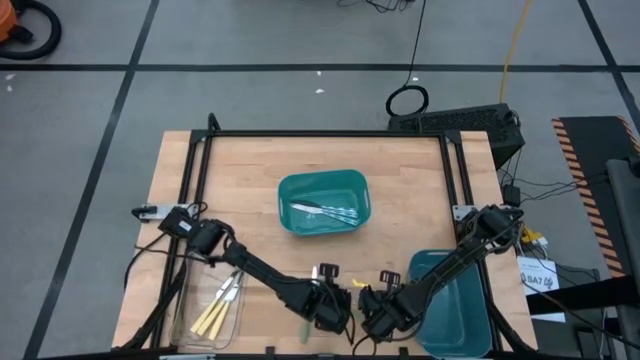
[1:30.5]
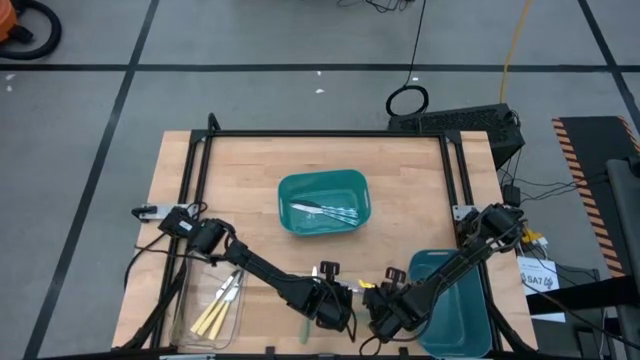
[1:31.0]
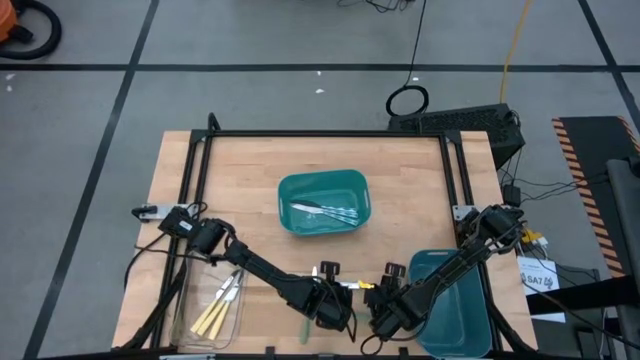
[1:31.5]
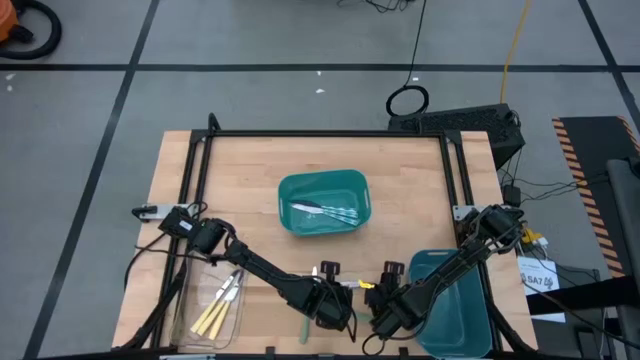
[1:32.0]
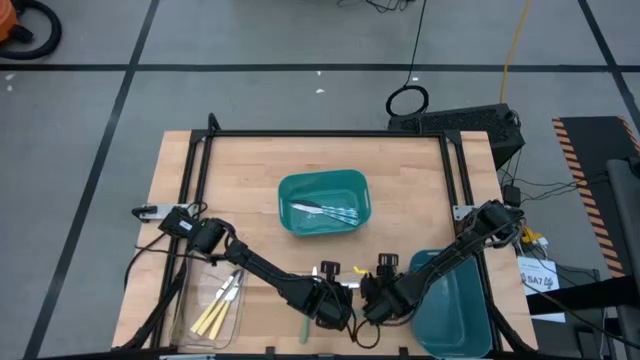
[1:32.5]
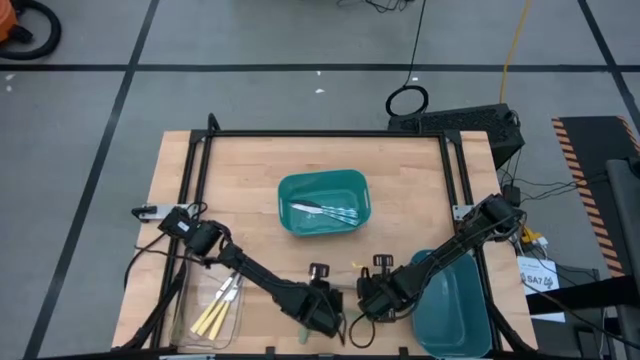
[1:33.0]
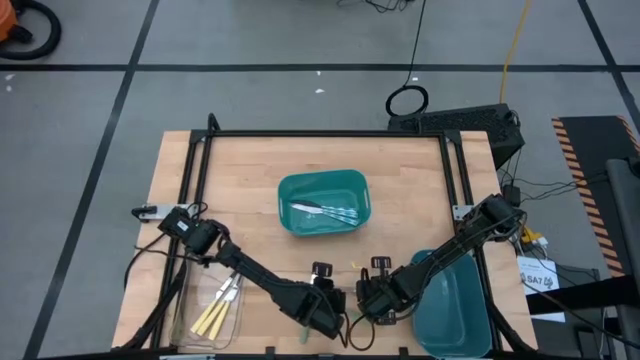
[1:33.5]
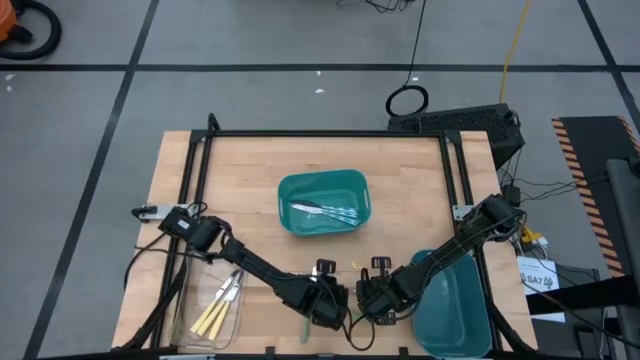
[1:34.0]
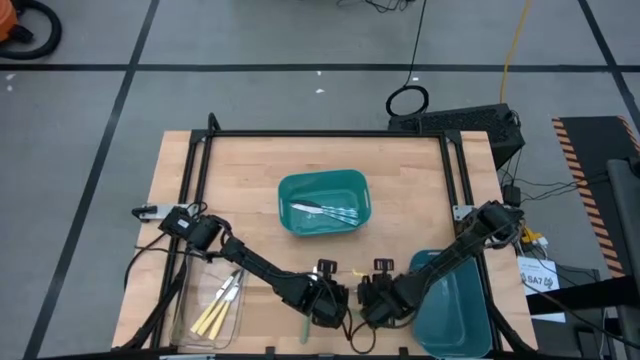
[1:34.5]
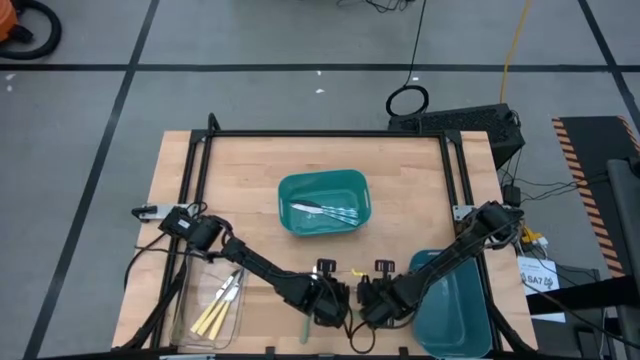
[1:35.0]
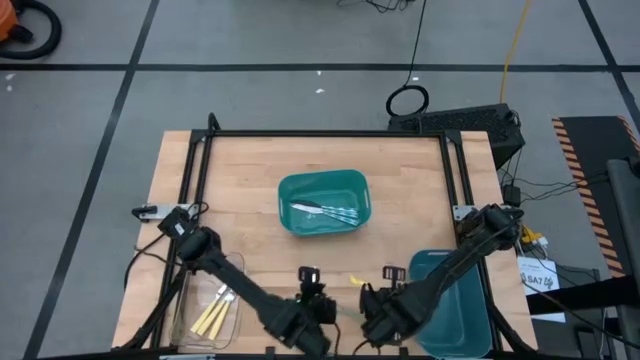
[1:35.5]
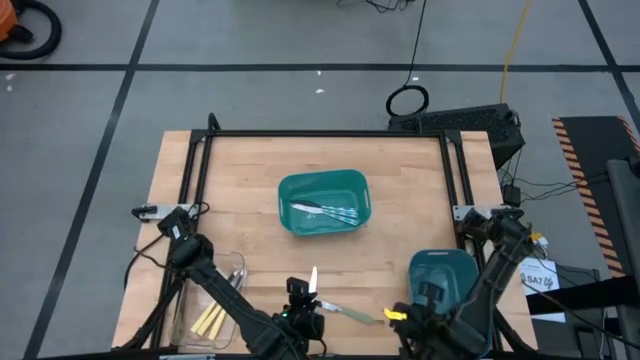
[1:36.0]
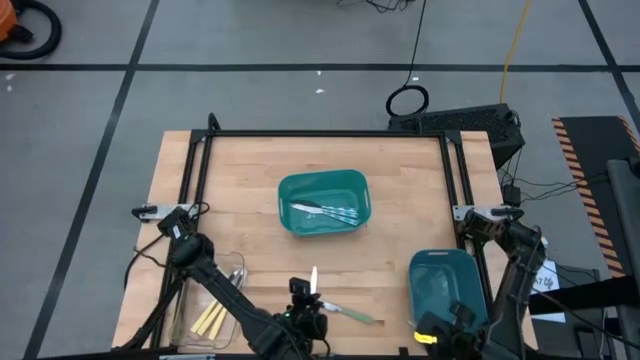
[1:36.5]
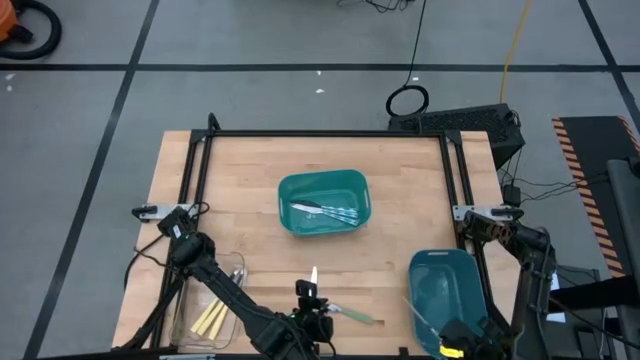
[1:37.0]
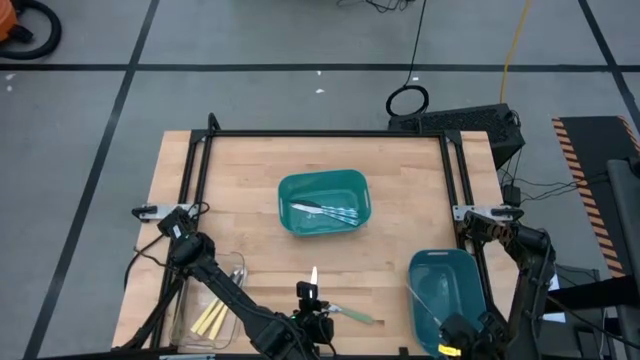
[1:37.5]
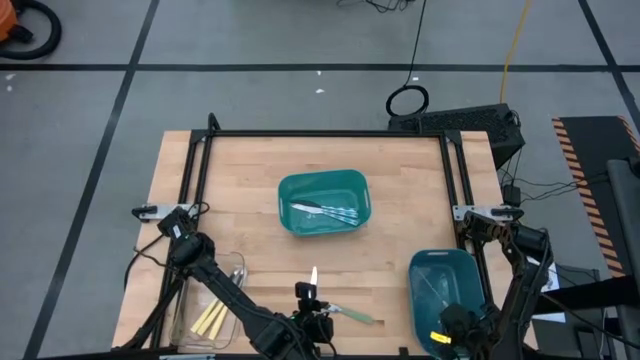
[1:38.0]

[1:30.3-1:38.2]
Task: Sort silverware by color (type)
Put the top green knife into the blue bin

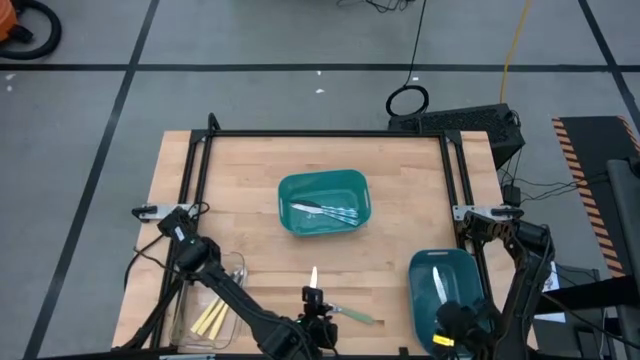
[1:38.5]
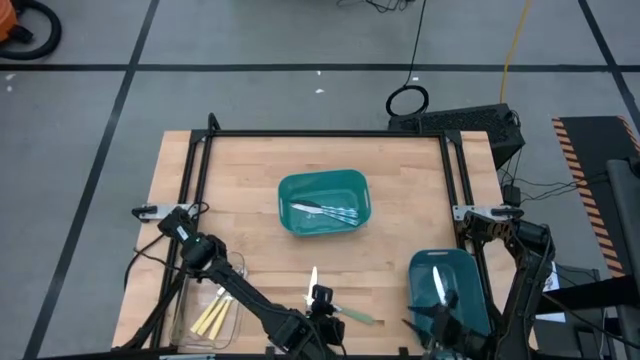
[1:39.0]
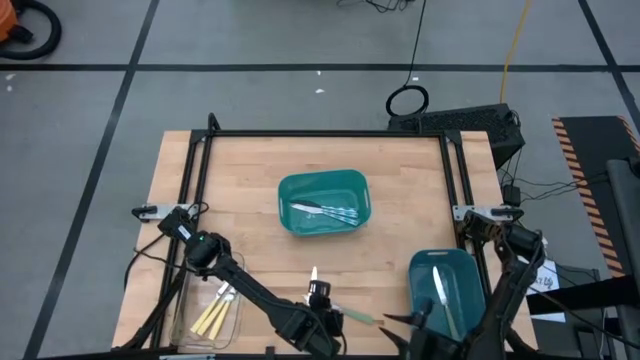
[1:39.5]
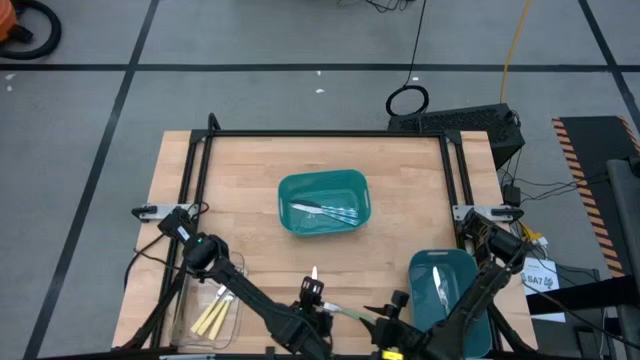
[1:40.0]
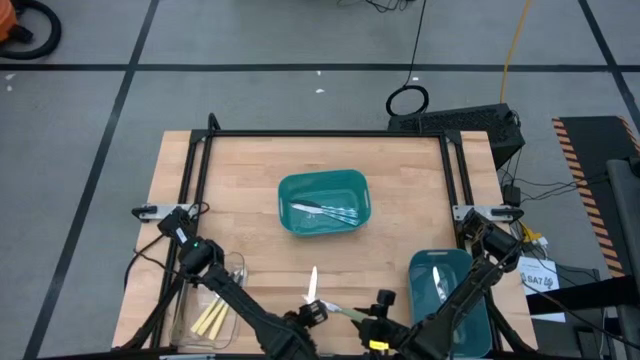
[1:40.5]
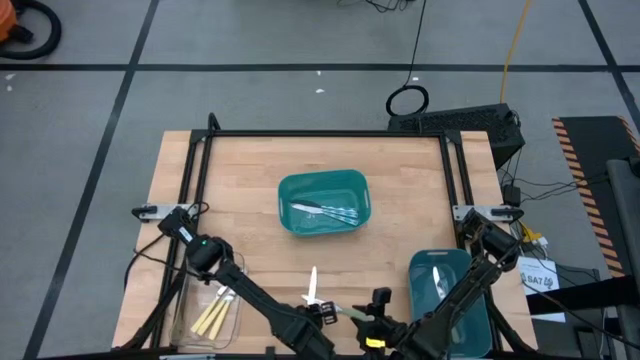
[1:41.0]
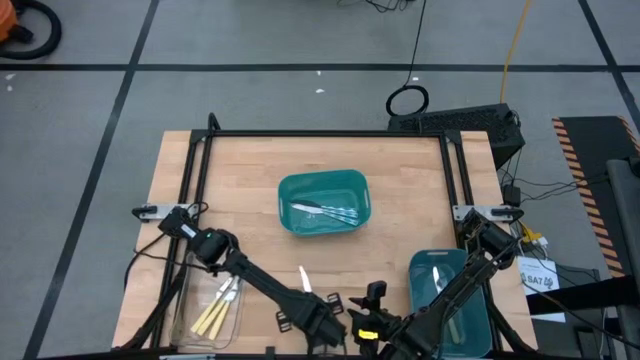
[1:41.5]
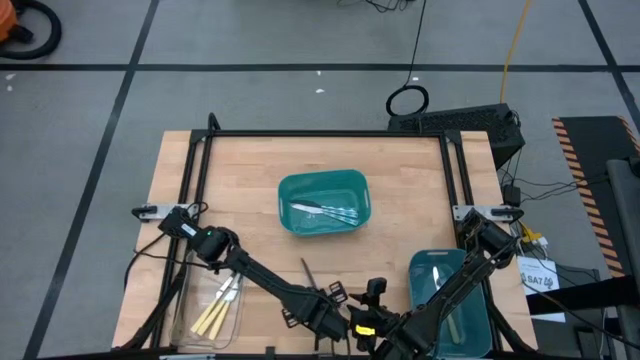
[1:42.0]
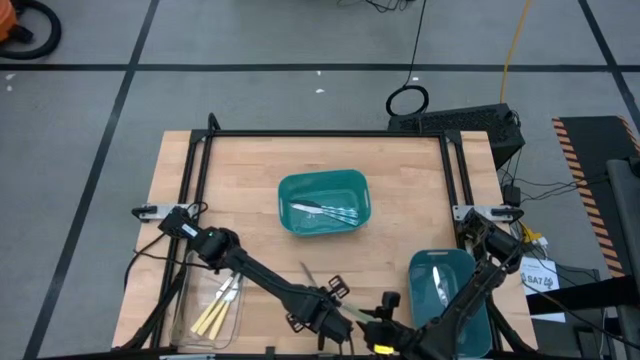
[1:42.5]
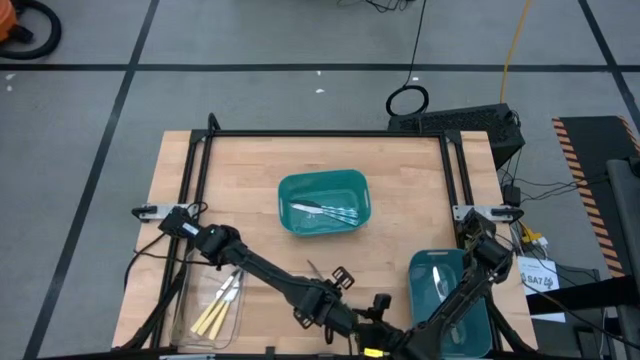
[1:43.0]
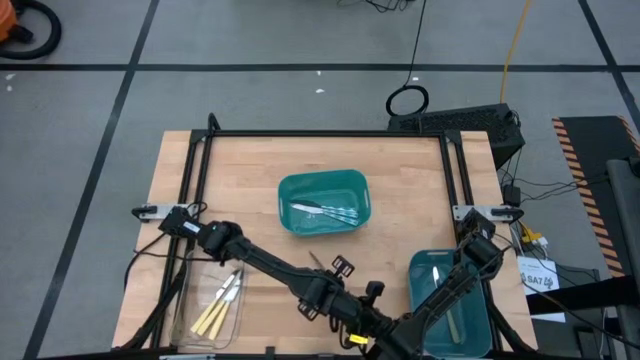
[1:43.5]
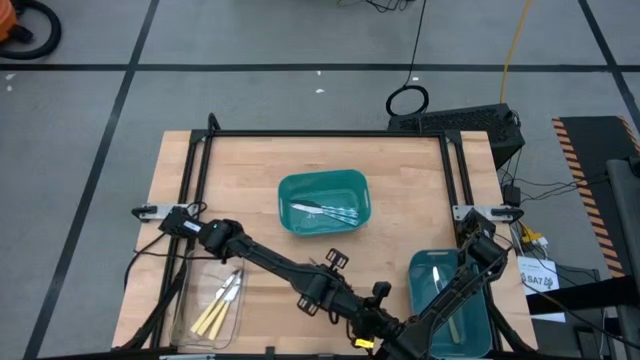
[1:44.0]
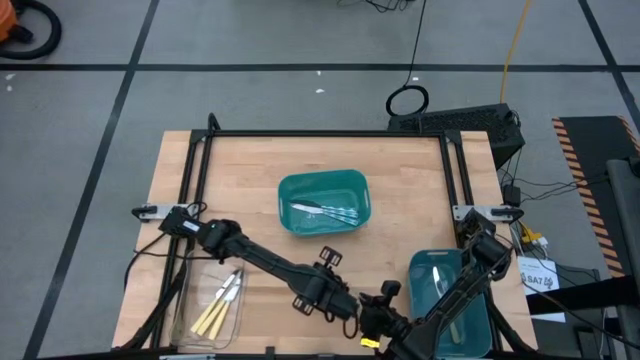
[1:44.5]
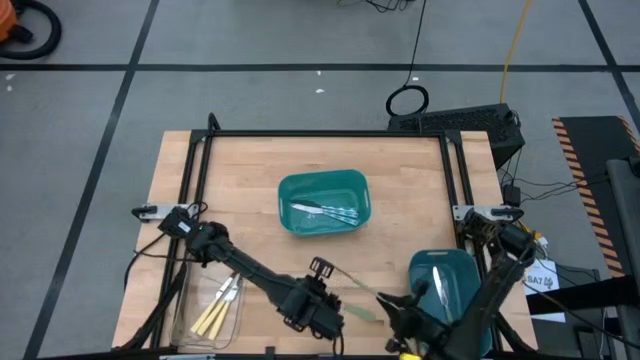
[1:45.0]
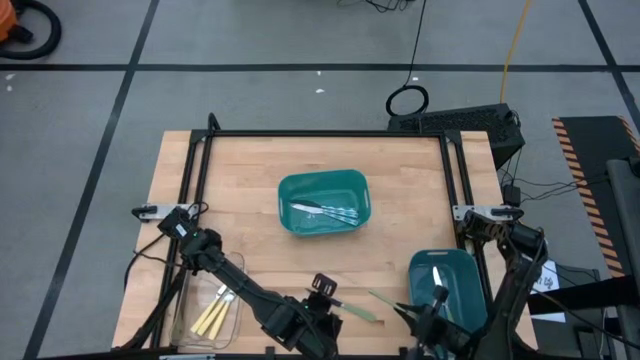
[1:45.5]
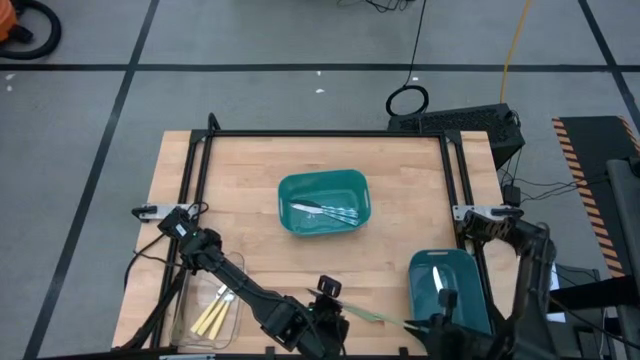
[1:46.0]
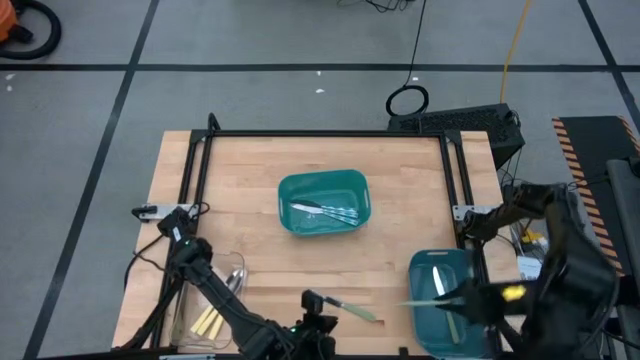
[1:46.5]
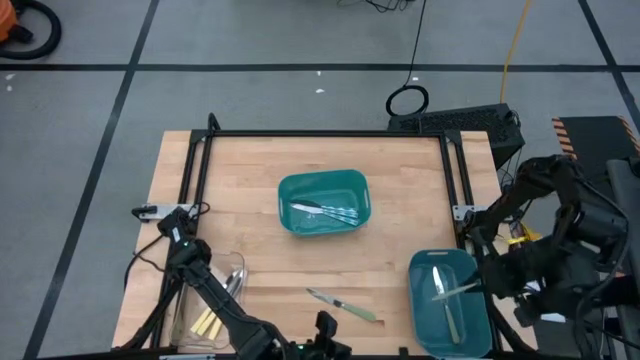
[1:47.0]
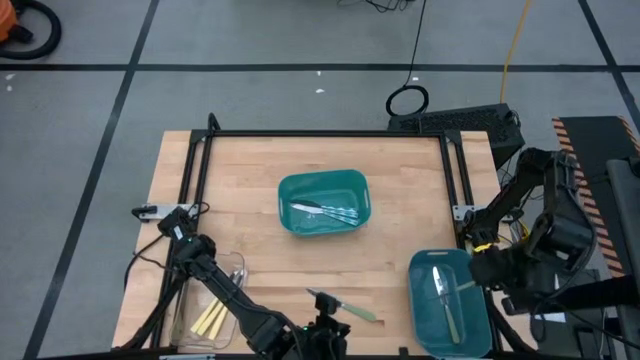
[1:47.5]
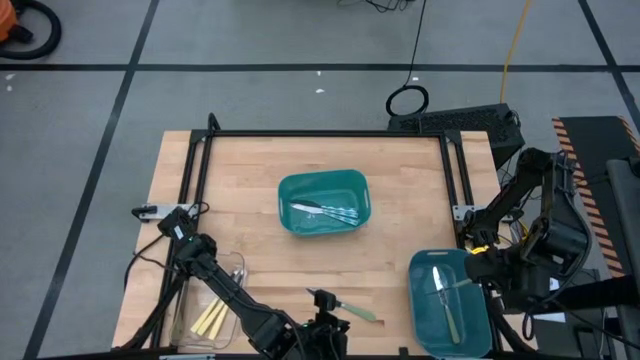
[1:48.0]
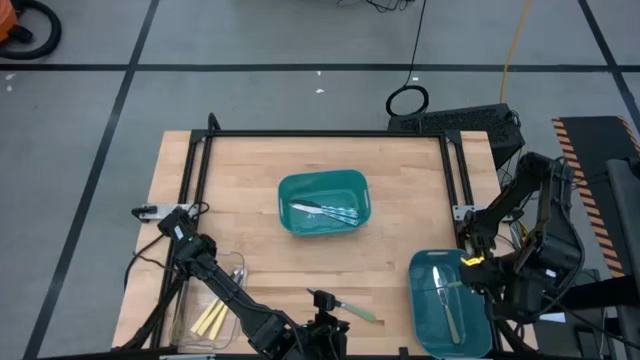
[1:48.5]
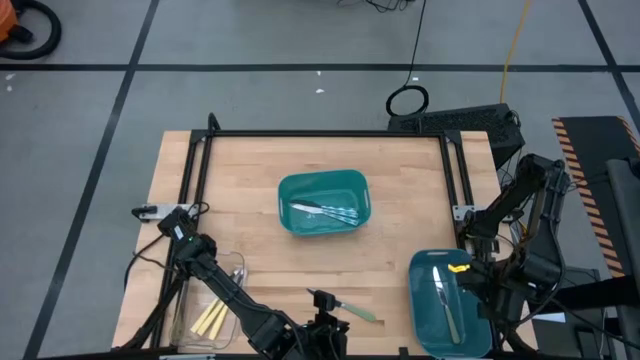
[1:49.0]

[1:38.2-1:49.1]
Put the left green knife into the blue bin

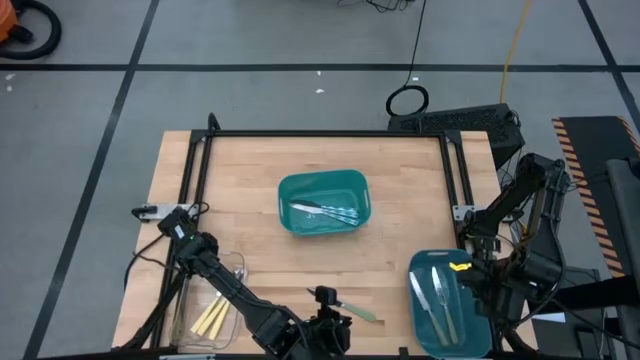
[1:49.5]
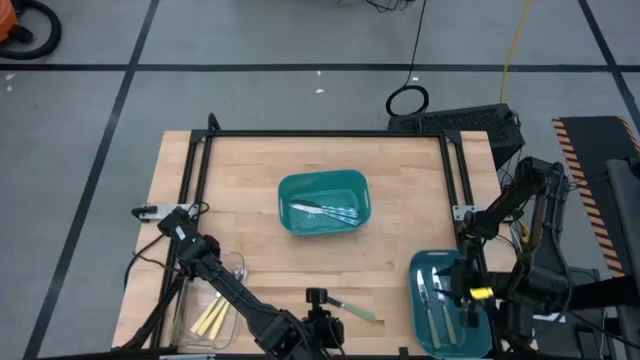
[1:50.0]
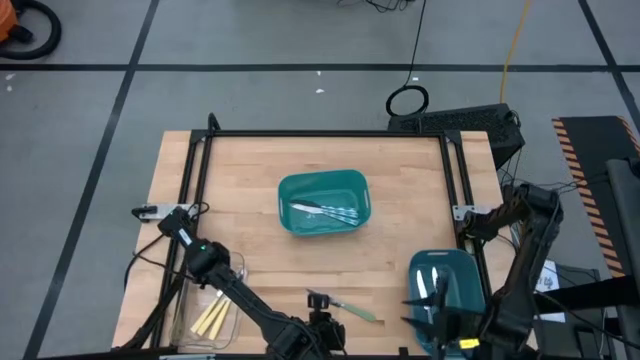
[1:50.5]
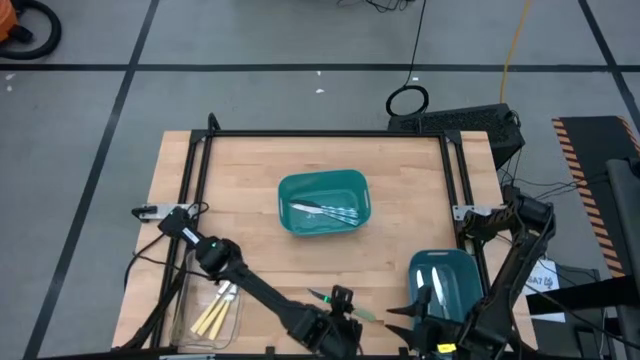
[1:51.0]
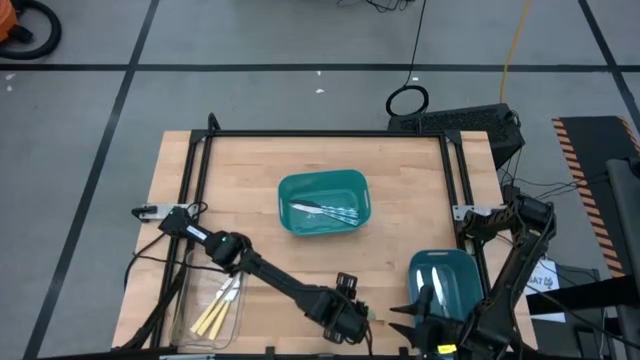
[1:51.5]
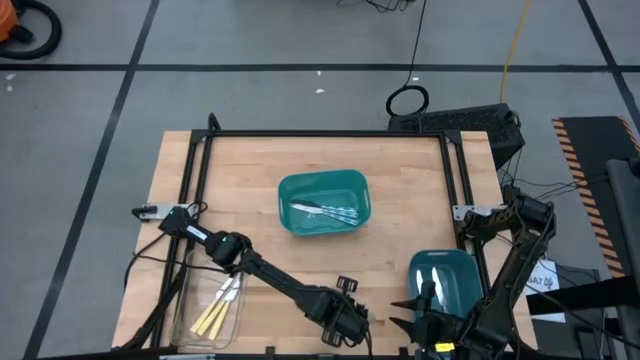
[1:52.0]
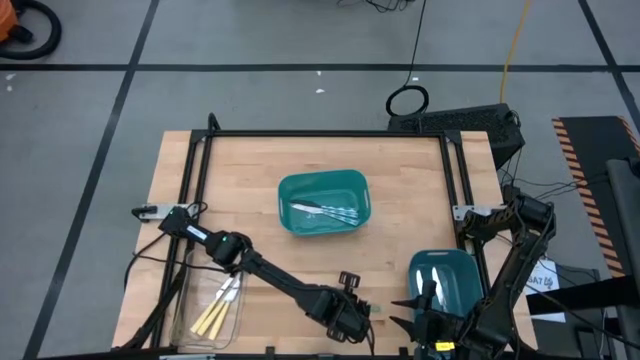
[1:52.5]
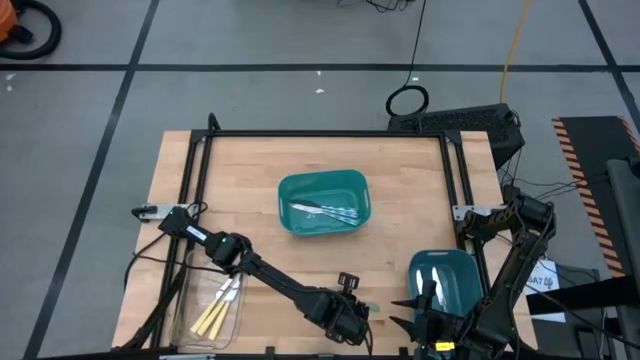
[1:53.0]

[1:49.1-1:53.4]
Put the green knife into the blue bin
